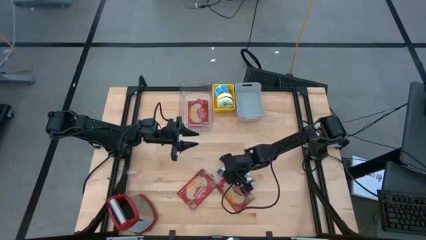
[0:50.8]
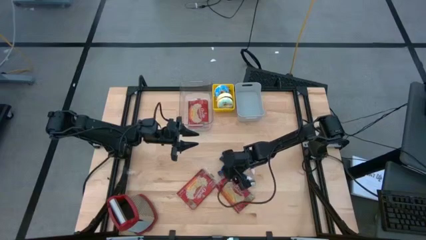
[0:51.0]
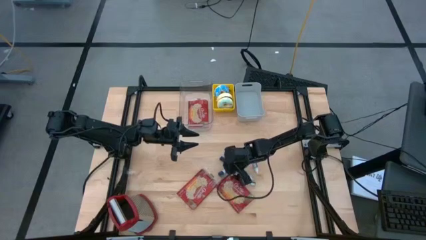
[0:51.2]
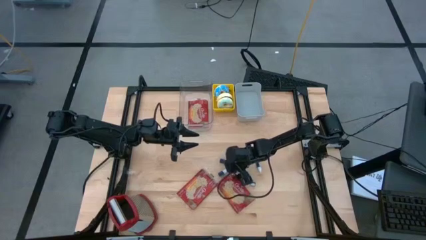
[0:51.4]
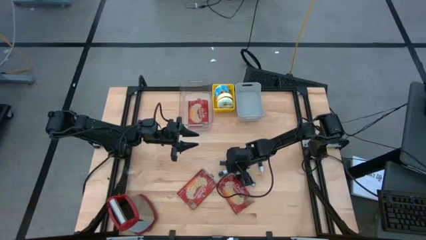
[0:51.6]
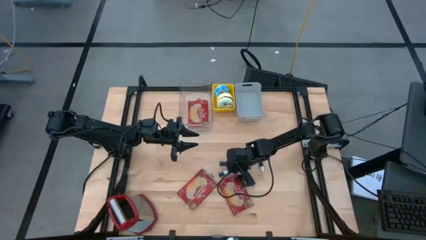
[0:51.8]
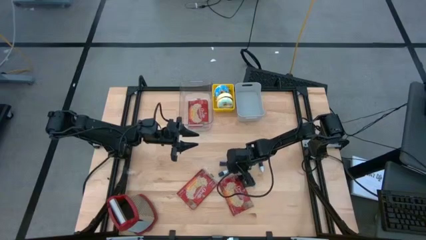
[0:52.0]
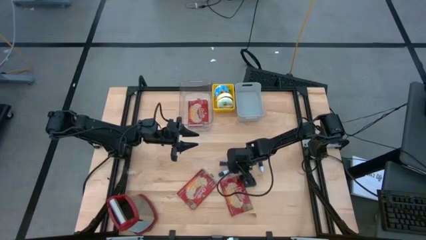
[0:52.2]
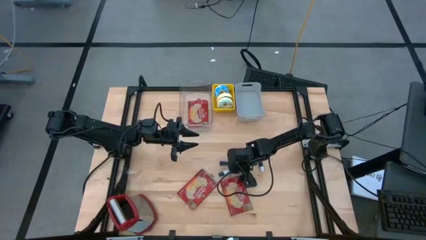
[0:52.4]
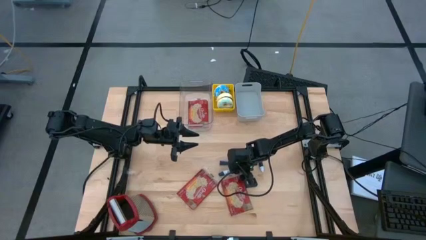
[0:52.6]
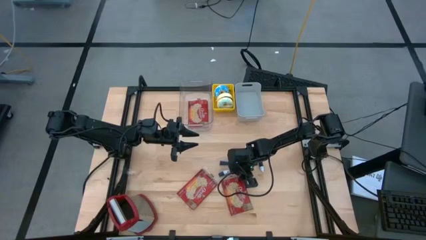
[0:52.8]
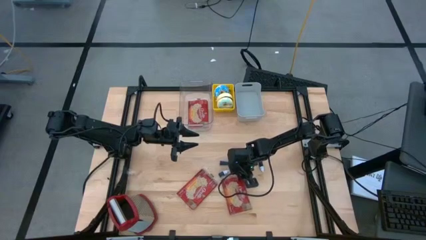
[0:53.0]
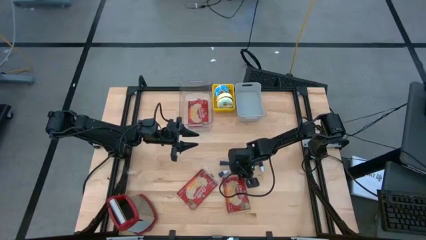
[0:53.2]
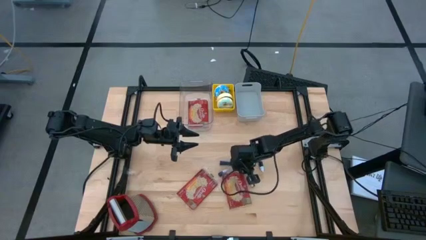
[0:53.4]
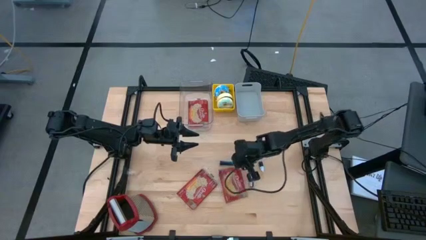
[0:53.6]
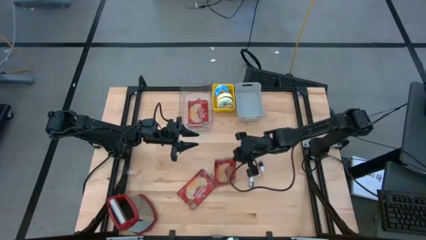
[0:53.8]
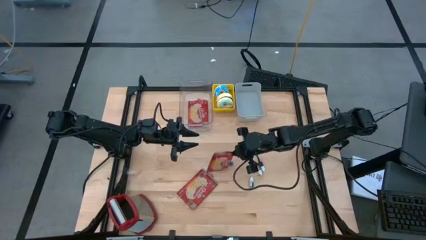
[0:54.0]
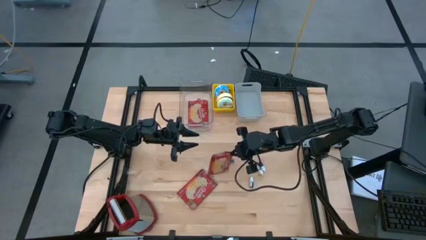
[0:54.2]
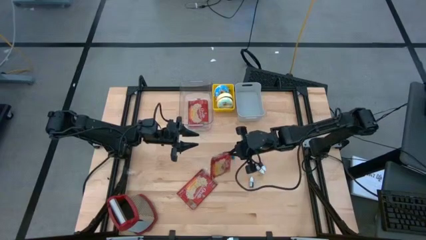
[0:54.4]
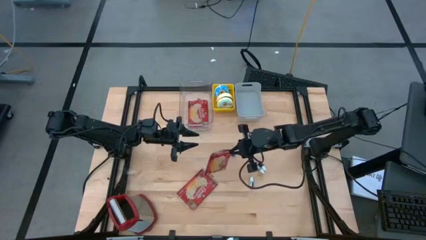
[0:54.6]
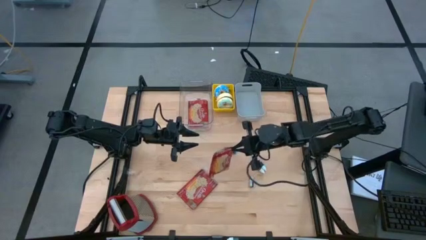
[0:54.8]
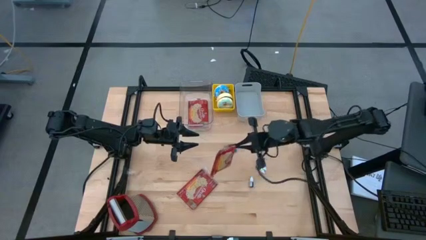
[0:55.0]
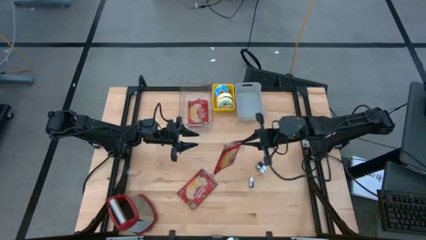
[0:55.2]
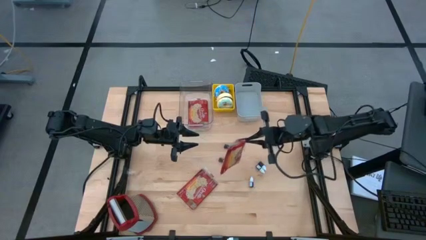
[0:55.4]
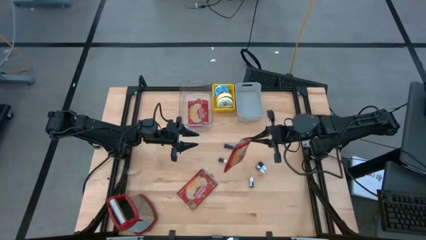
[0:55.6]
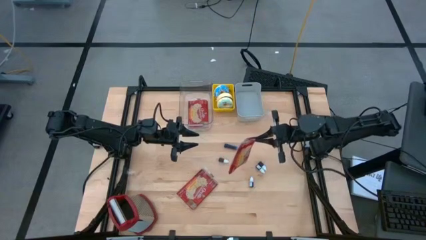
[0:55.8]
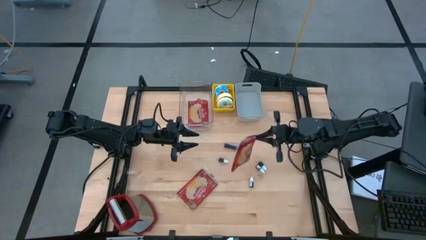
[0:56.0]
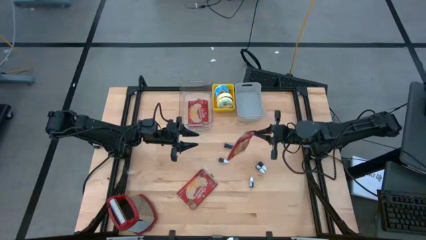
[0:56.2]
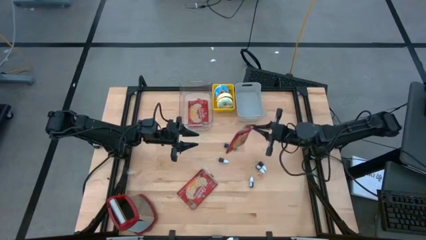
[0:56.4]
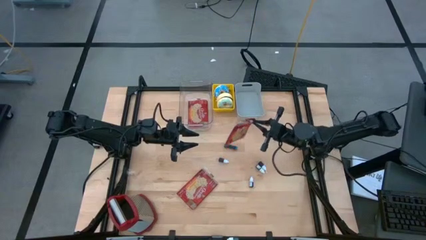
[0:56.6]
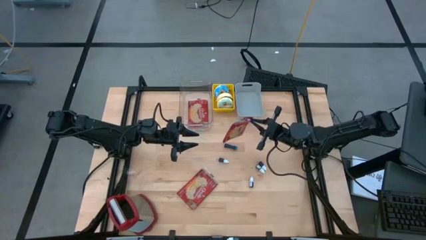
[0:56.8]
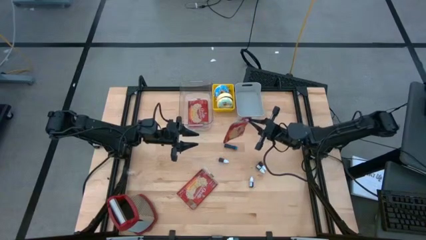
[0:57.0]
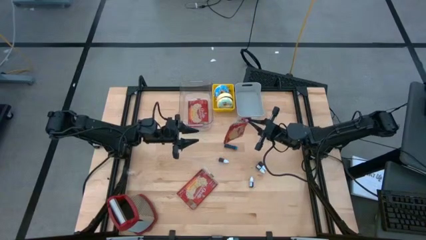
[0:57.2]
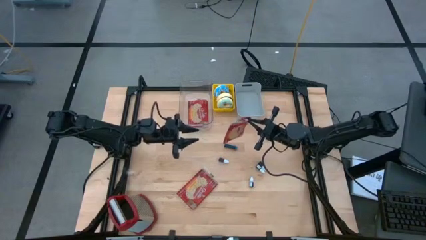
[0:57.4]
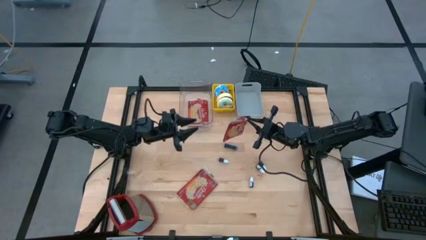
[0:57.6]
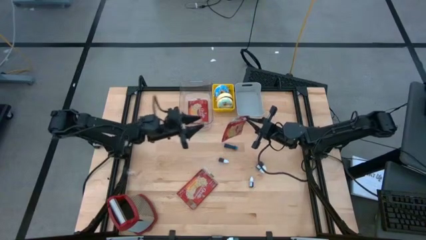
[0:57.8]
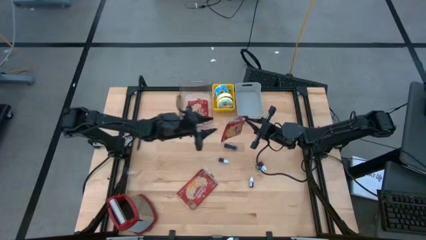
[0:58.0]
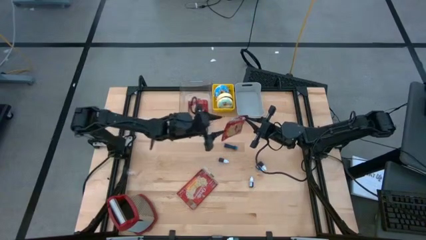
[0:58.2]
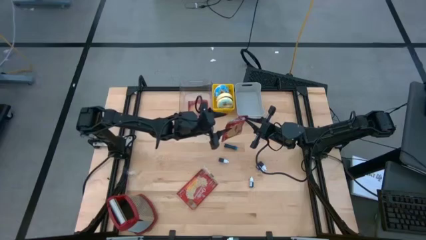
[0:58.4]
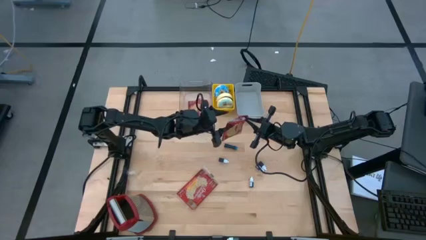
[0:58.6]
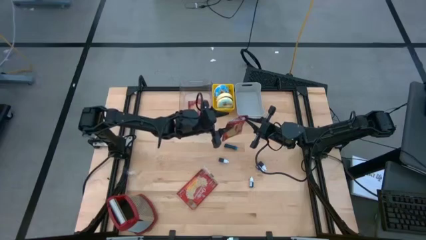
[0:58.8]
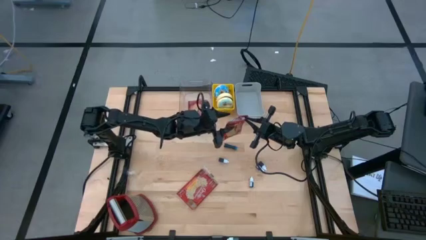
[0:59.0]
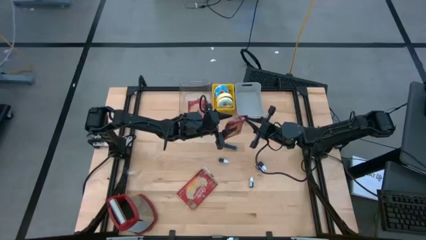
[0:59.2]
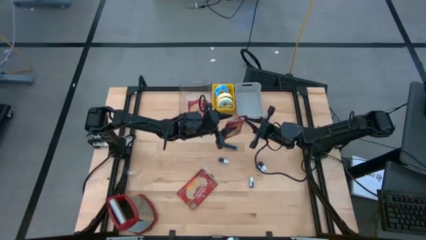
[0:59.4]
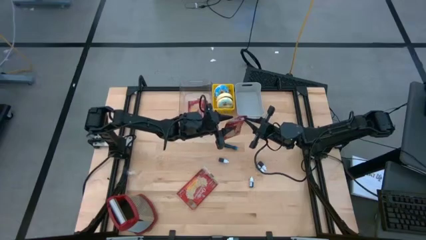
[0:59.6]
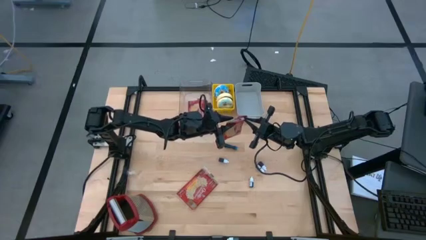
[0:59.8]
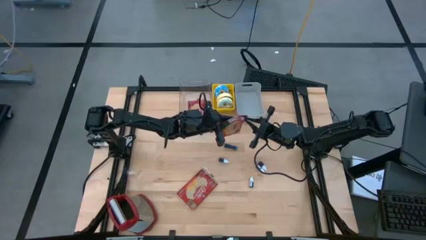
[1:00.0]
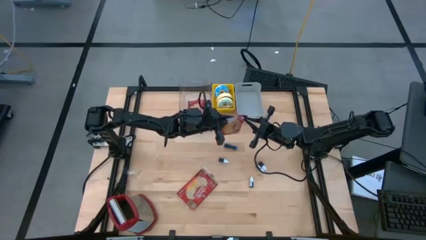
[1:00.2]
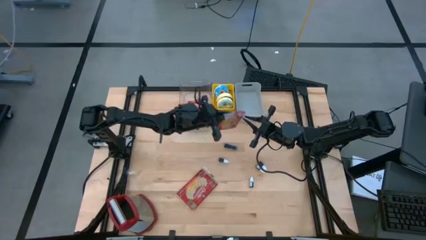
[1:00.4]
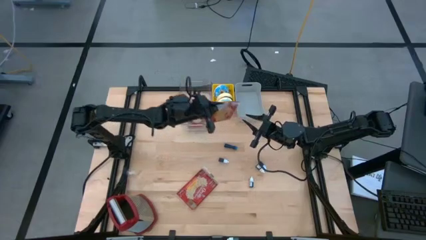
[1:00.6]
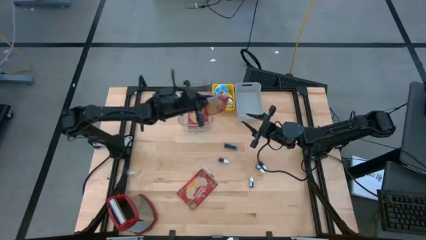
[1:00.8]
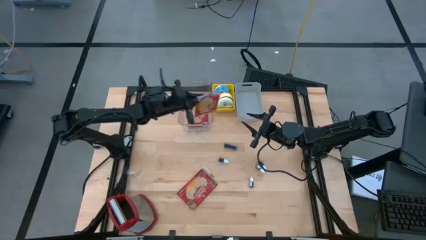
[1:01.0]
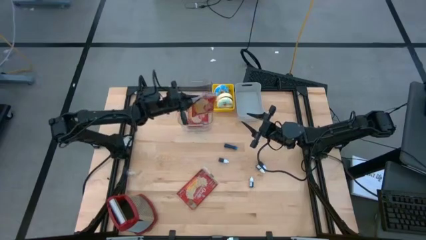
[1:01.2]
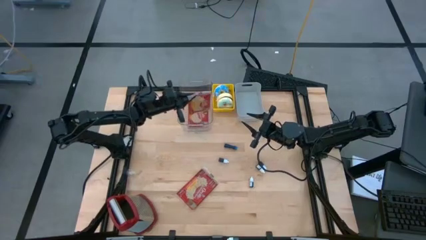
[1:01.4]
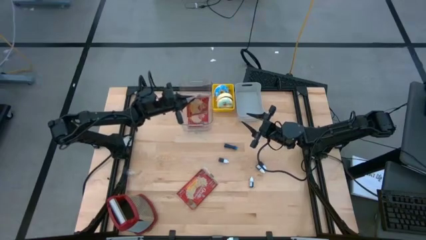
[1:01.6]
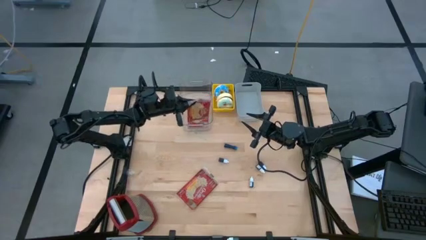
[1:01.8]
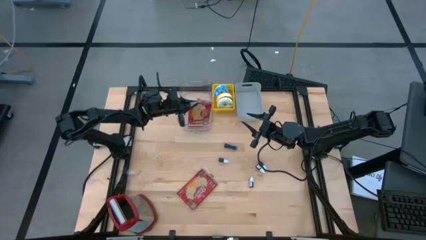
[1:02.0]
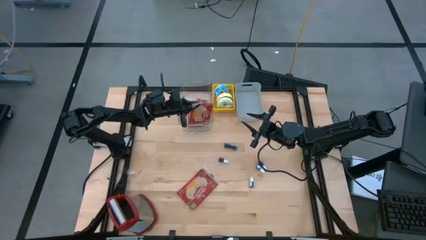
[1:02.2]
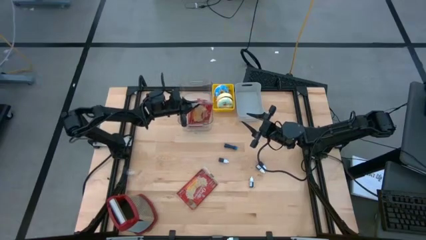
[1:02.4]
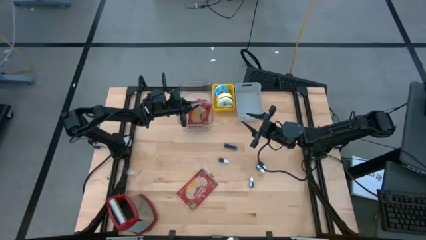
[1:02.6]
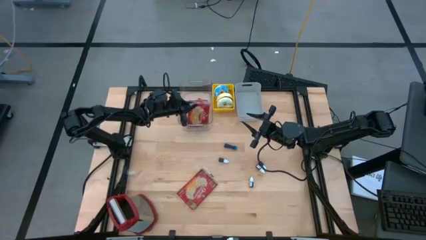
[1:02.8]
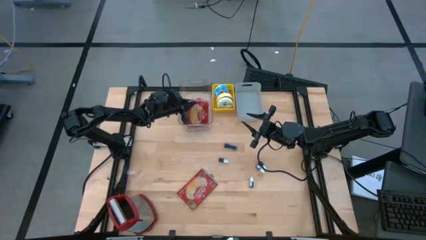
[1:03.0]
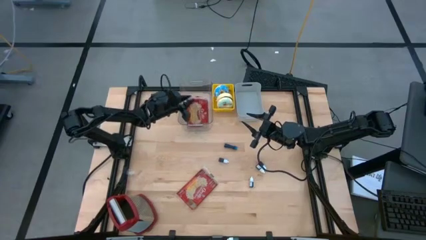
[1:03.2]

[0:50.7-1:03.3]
Stack the right red popcorn bag on top of the other red popcorn bag in the clear bin

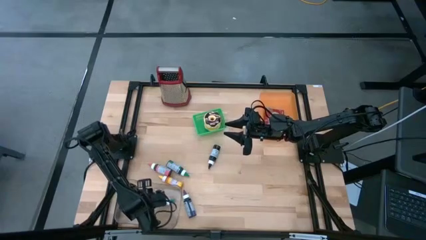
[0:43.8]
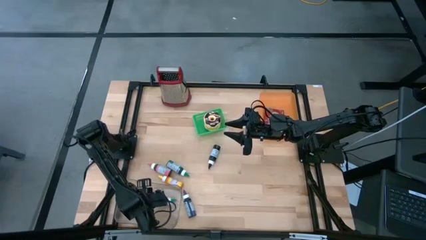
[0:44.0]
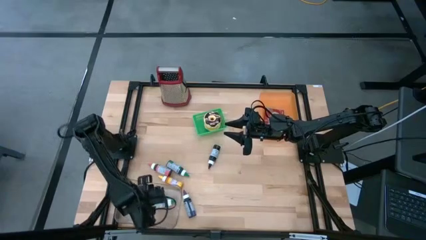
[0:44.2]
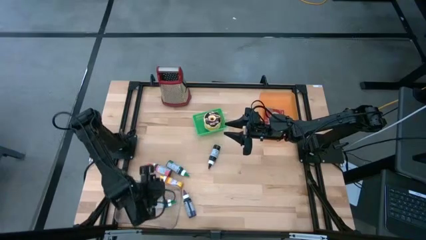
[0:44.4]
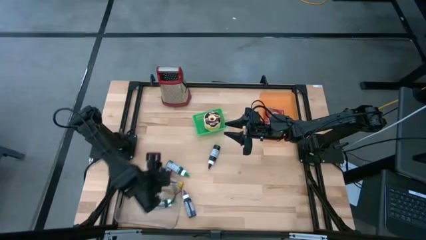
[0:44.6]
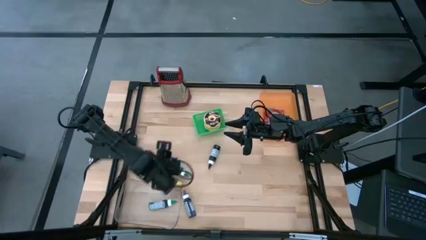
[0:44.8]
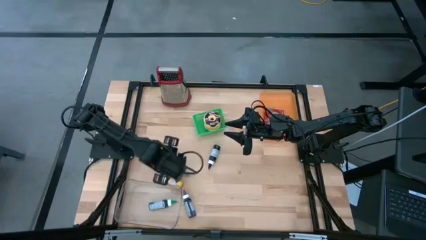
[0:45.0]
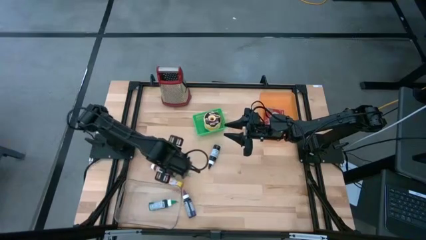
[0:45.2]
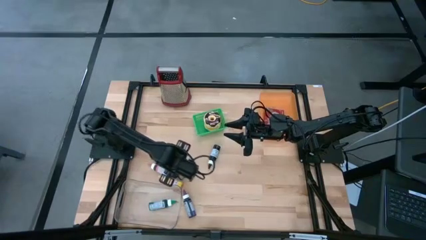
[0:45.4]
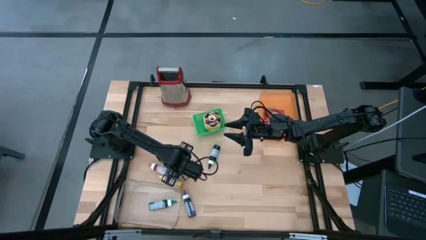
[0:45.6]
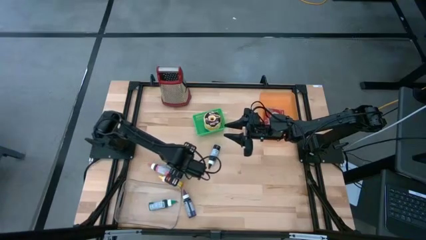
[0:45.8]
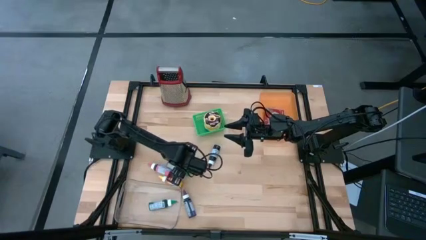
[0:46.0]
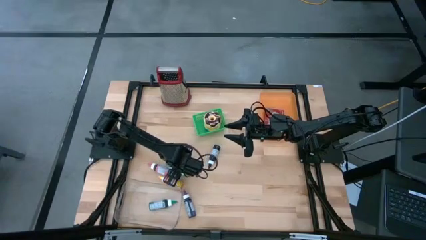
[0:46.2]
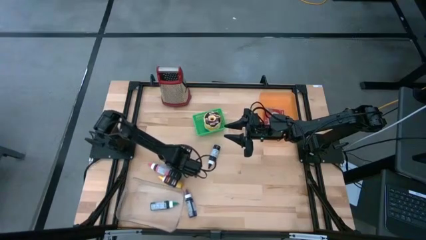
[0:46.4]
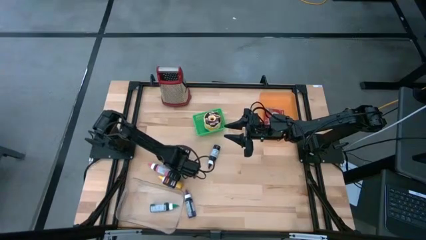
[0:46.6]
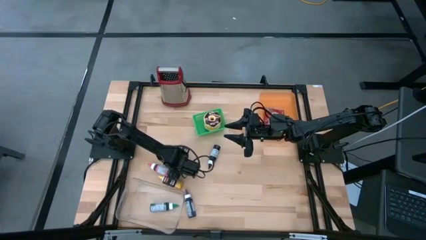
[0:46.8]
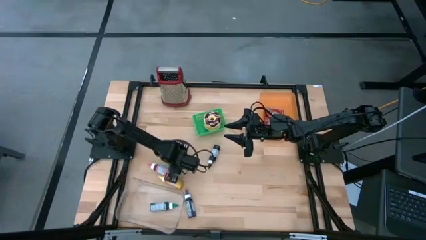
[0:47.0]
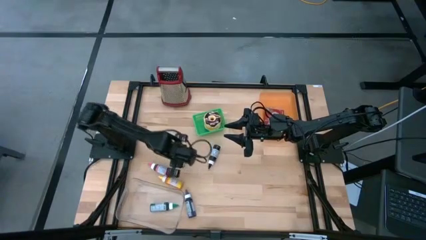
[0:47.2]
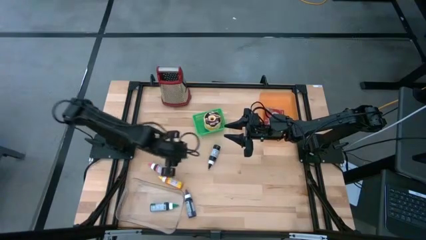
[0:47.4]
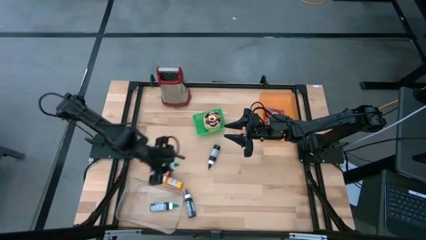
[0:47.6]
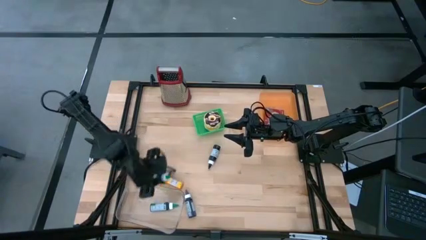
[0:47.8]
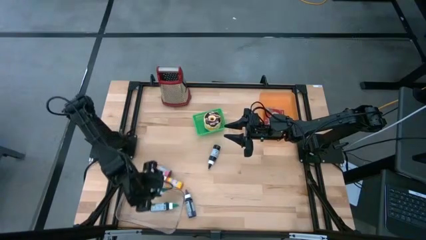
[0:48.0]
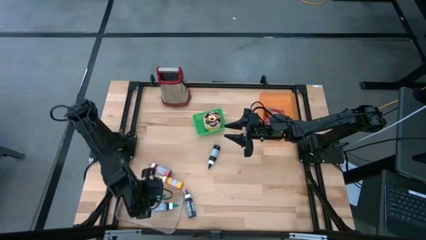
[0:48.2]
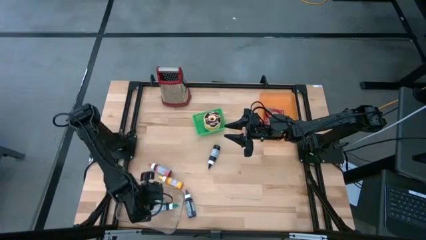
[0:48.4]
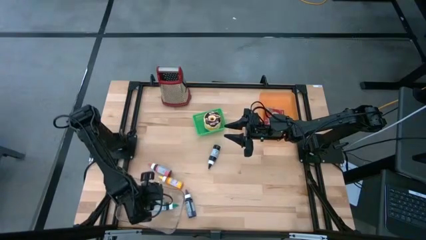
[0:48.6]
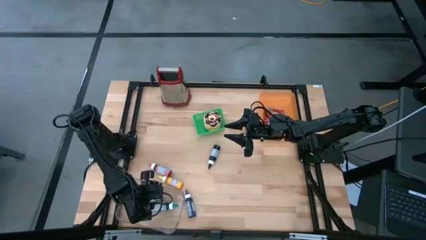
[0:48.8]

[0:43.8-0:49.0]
Put the green food coloring bottle into the transparent bin
